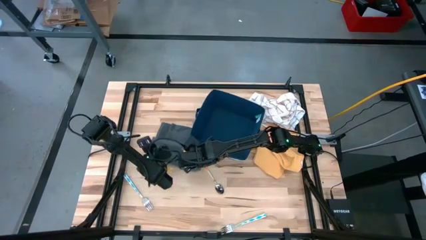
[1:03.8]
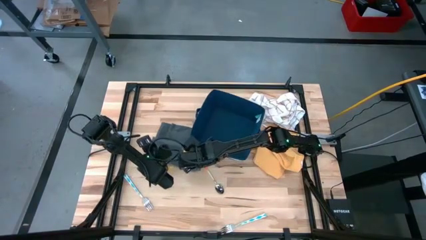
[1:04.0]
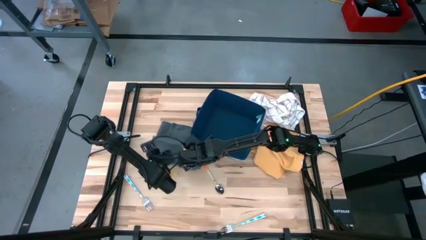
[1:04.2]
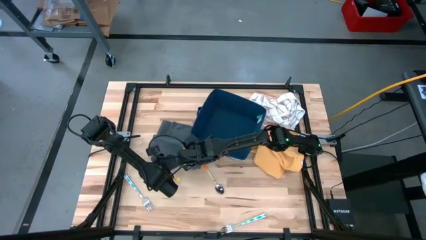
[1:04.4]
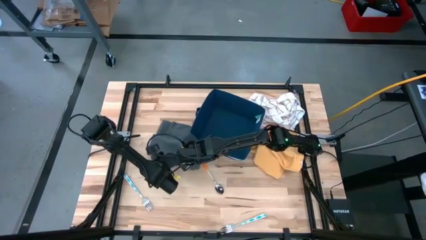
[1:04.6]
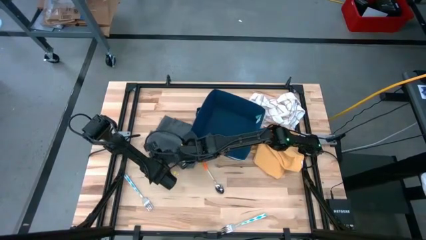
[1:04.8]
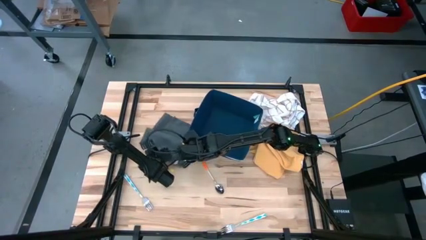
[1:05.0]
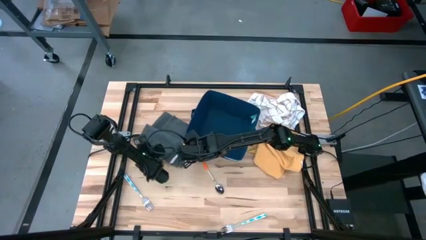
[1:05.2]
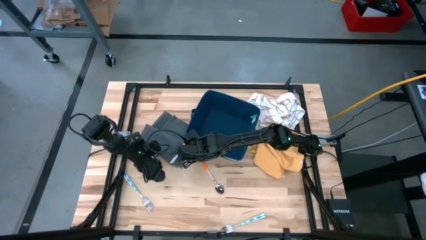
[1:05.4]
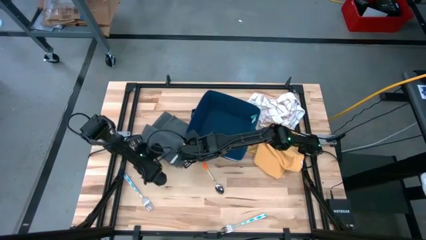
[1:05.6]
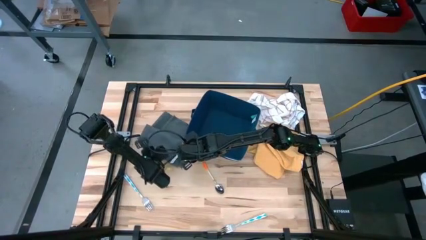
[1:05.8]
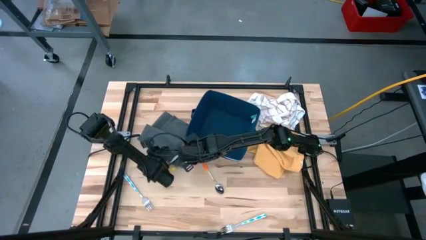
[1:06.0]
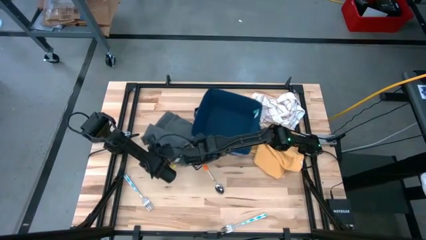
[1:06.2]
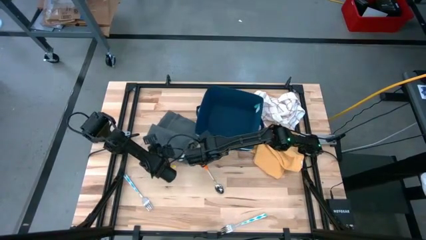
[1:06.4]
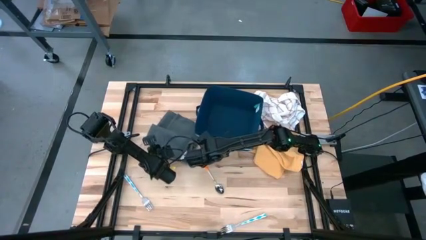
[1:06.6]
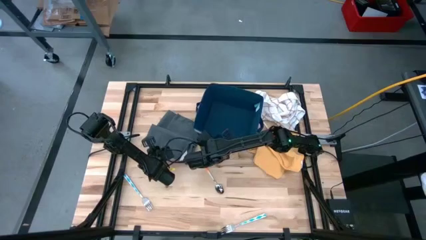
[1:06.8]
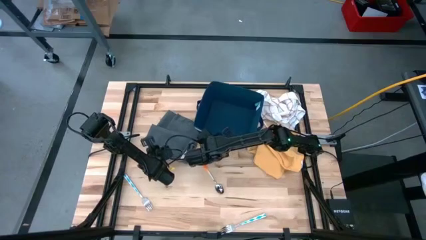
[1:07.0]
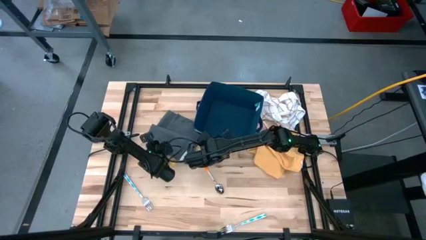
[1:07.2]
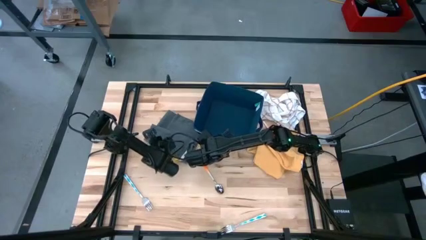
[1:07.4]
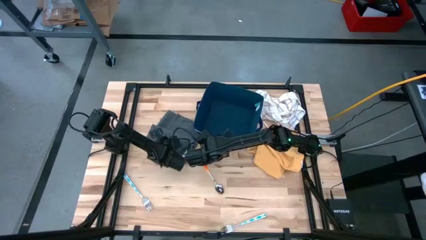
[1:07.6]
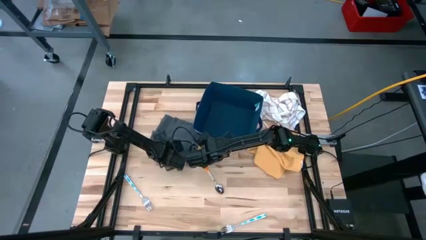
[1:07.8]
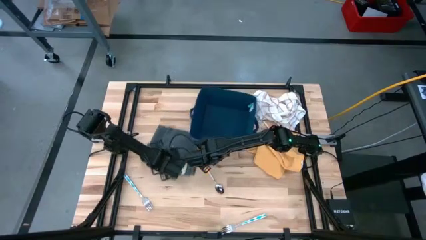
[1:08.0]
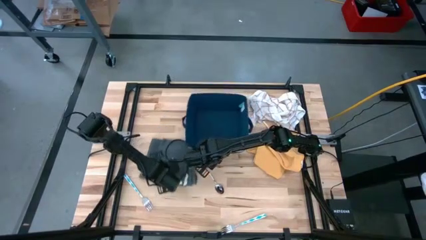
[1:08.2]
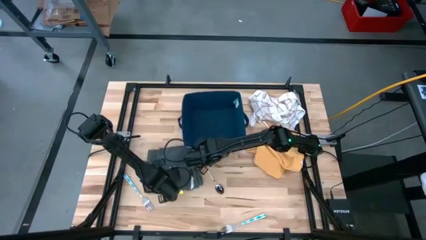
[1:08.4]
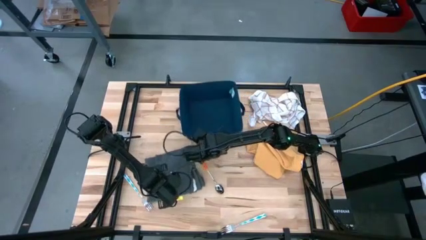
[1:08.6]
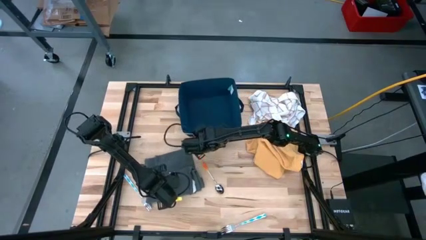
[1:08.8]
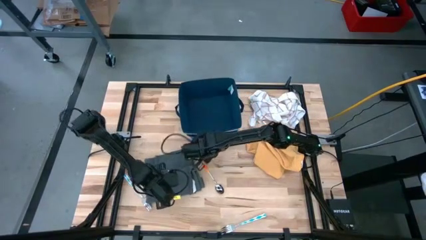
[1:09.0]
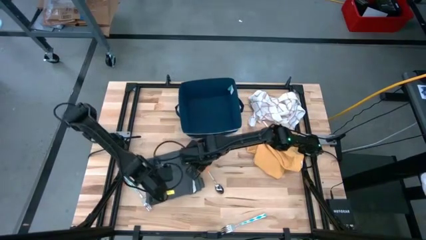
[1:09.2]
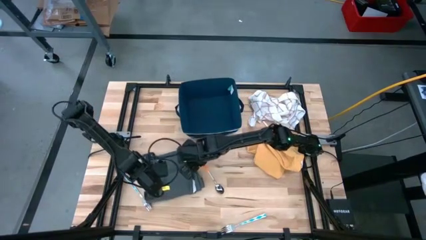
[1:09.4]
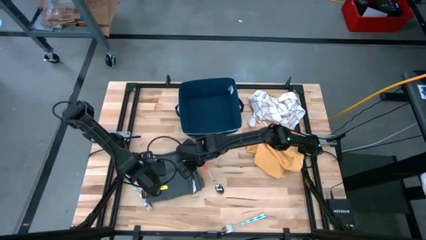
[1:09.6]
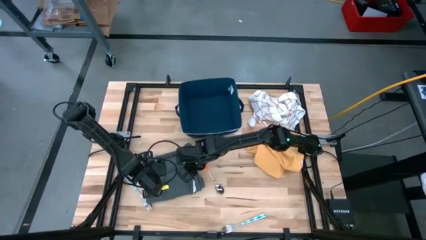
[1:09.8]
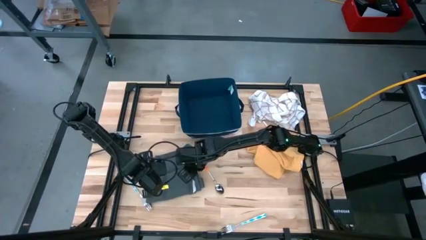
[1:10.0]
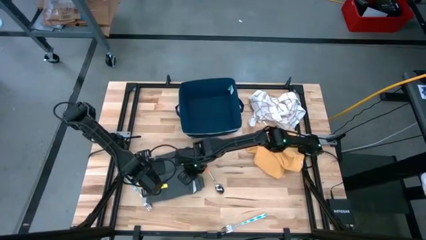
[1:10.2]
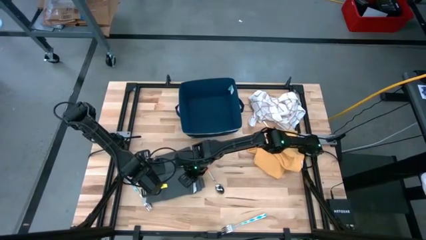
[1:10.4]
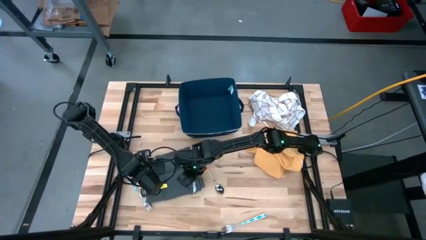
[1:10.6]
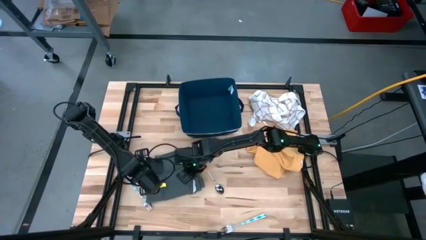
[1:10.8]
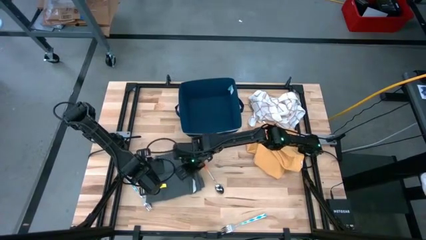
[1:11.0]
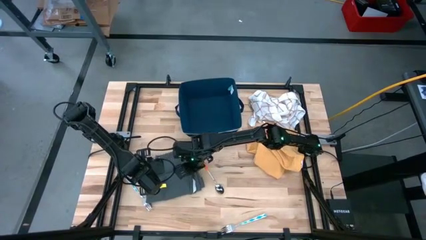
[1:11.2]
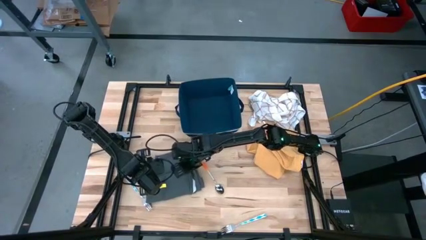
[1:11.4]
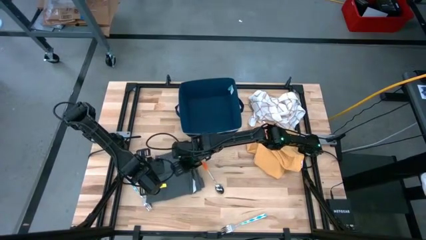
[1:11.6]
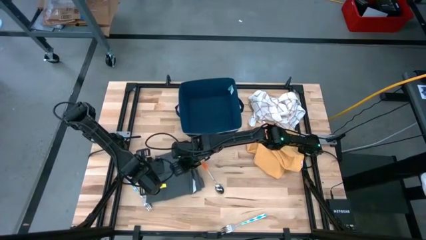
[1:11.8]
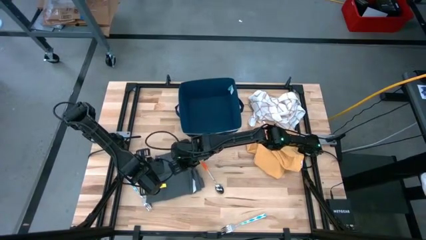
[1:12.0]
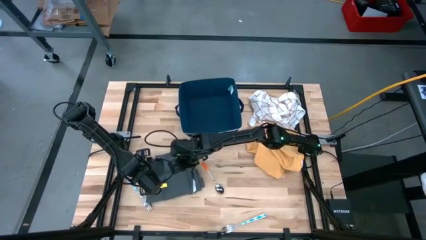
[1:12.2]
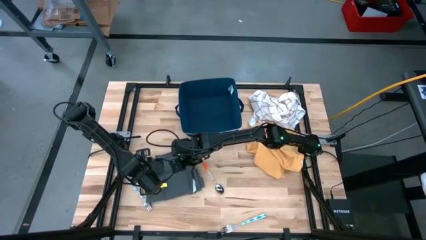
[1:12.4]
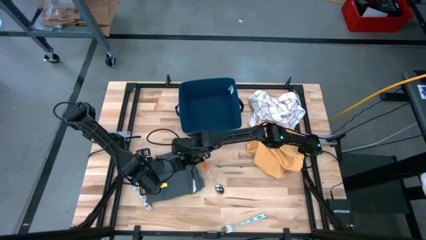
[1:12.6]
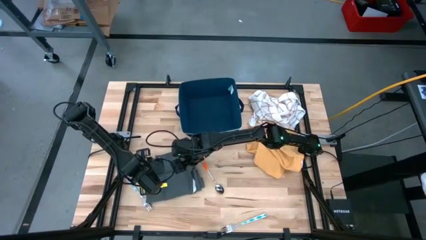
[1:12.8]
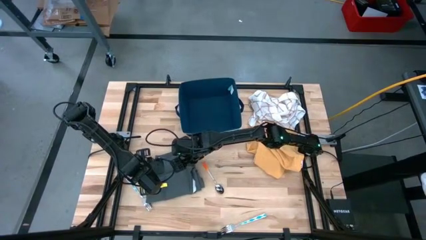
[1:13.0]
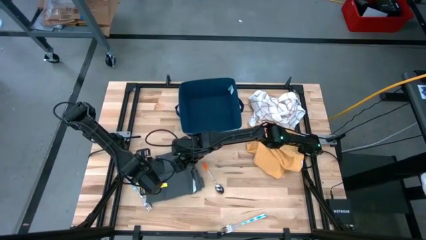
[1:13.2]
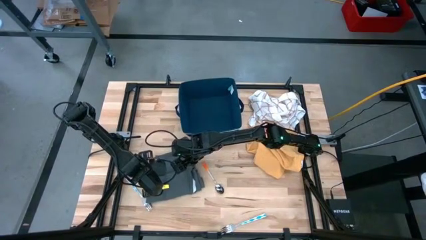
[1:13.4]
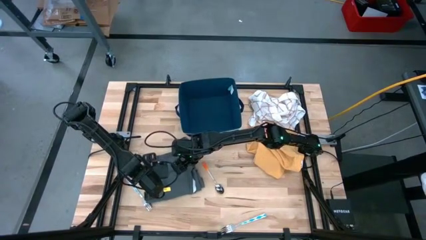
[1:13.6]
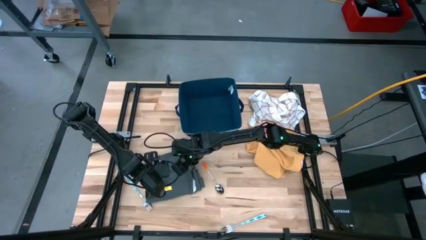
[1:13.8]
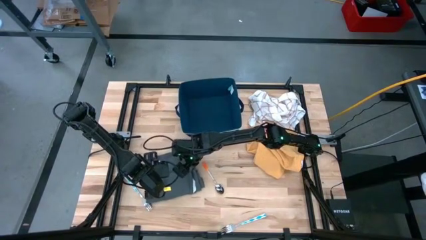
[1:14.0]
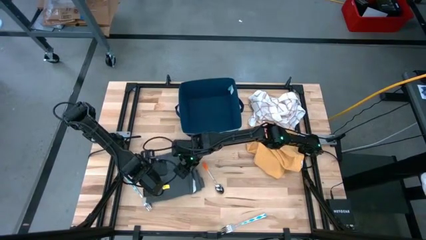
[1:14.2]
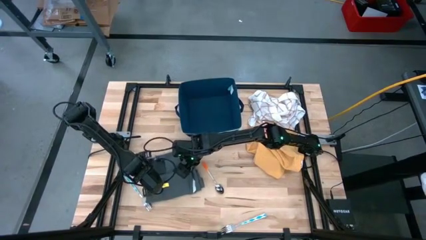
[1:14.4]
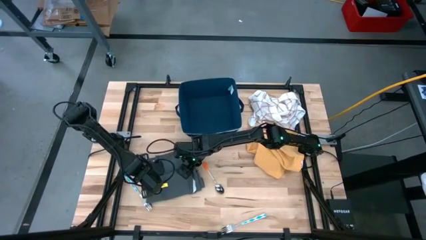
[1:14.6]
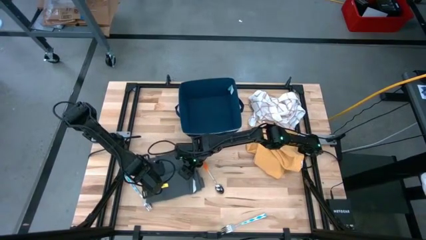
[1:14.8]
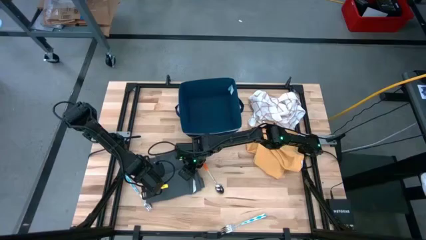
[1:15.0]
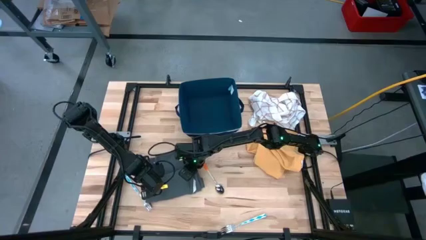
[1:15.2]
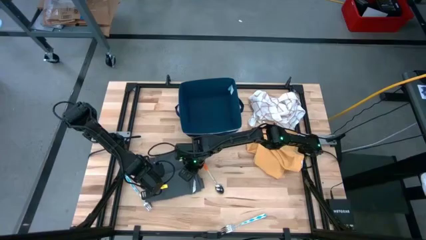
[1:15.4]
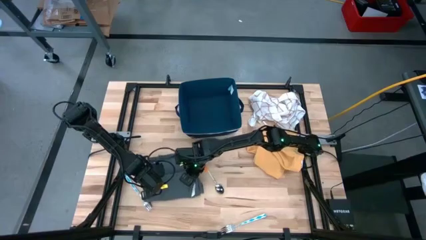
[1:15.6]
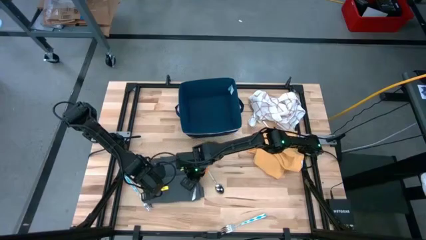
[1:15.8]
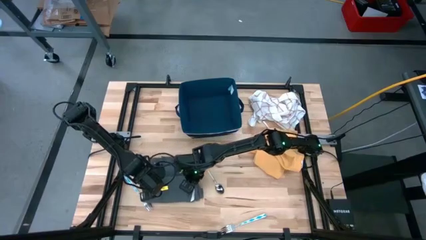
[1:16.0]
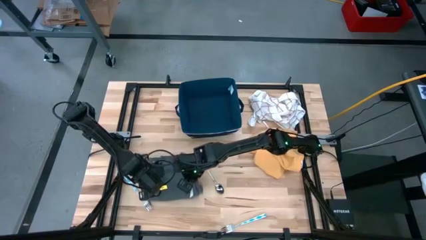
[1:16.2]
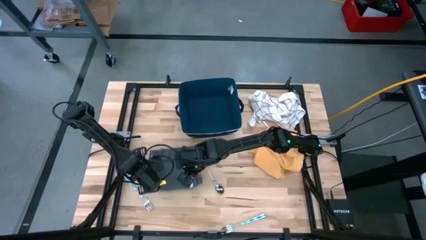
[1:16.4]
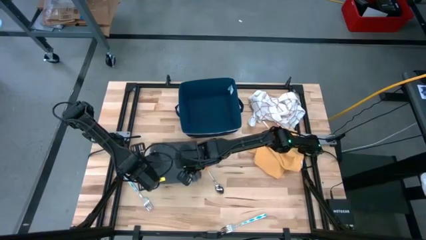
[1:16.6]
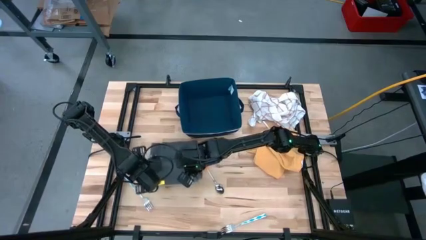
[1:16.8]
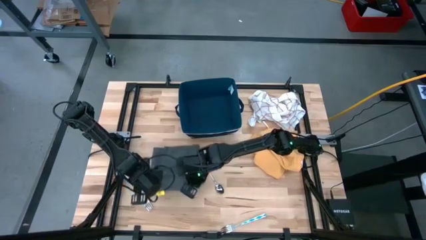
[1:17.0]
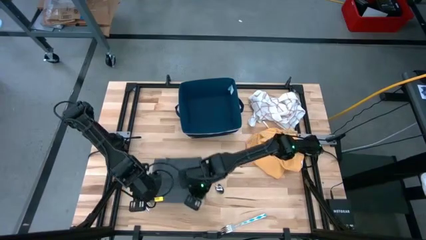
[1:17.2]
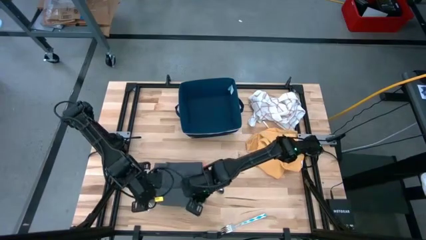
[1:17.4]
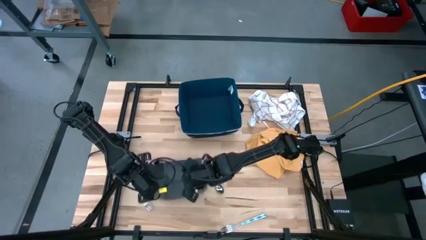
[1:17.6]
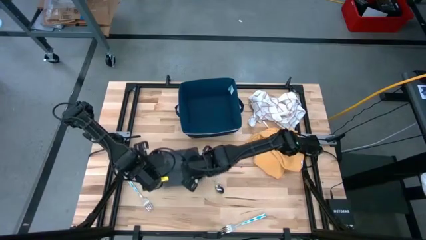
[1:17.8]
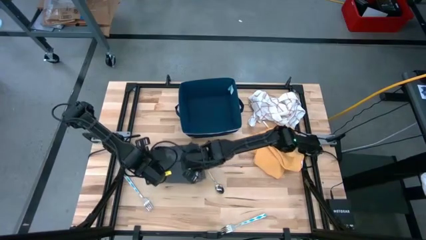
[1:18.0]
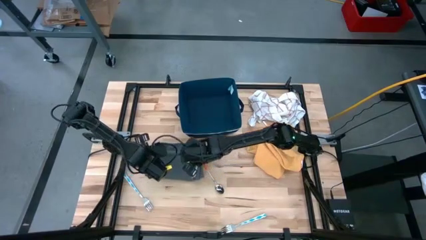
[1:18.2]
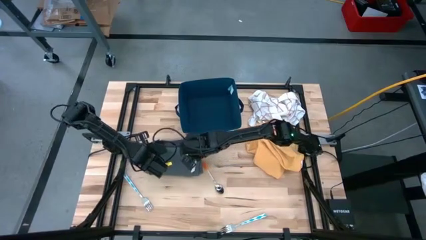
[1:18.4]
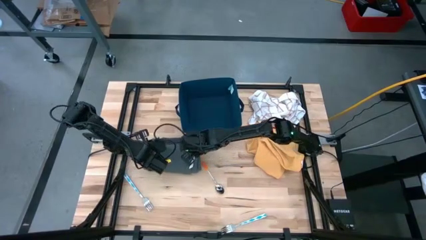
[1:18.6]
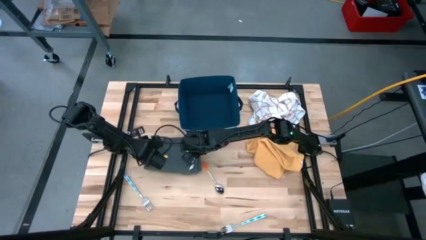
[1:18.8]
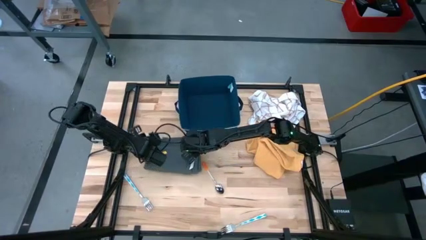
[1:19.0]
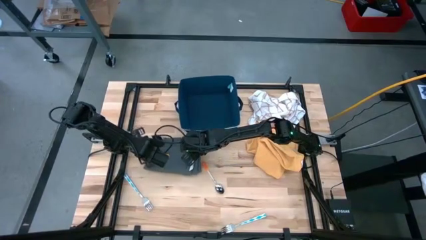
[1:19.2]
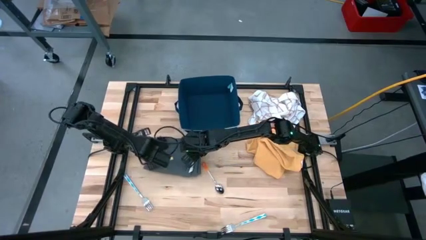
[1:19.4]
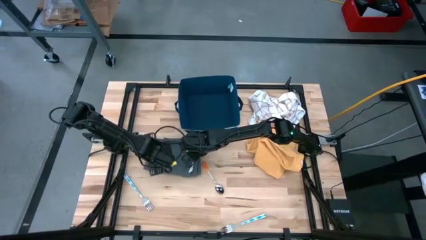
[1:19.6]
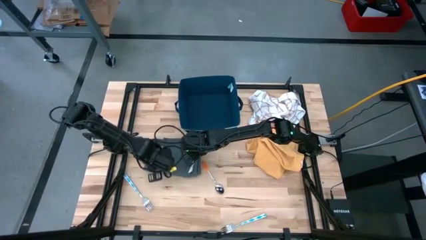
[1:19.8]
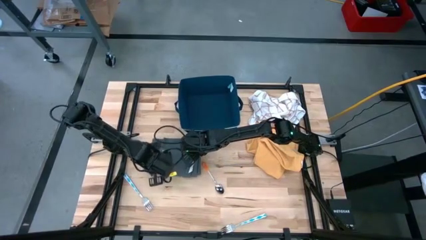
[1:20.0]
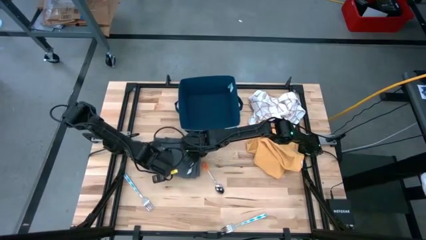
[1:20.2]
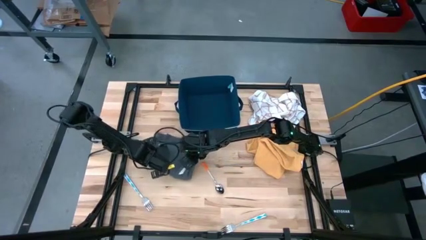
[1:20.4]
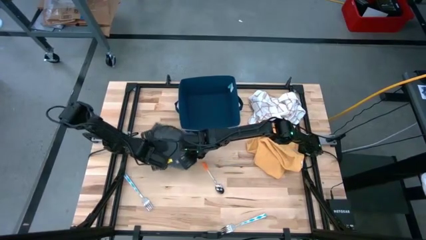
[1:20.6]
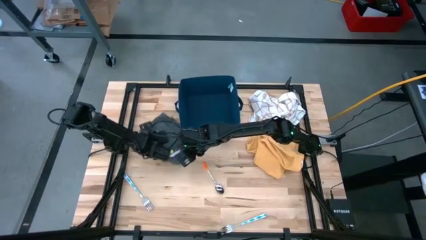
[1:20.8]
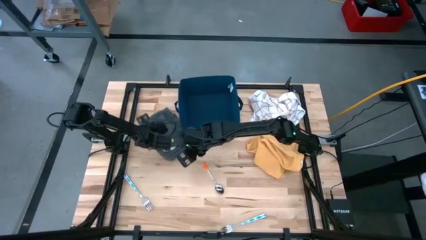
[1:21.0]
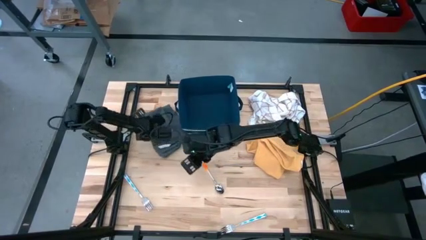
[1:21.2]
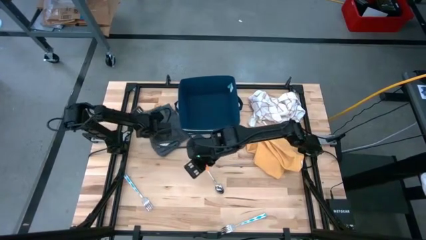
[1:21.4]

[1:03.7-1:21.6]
Task: Fold towel
Fold the gray towel
